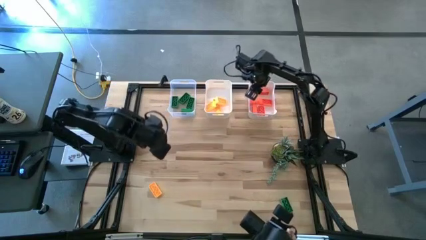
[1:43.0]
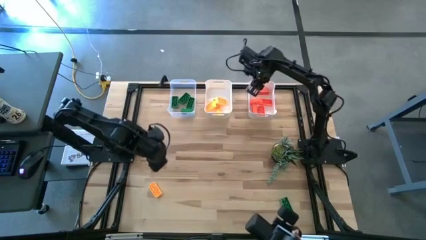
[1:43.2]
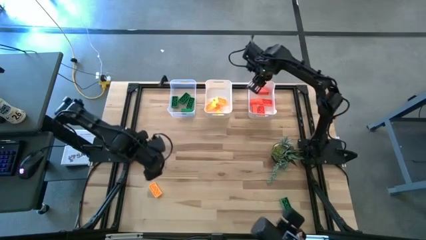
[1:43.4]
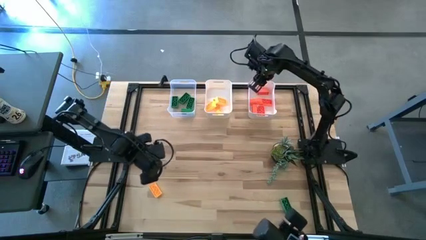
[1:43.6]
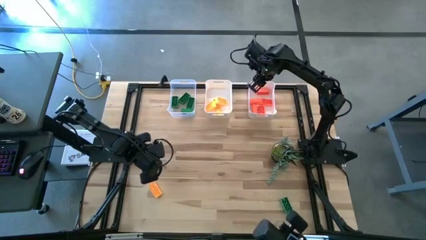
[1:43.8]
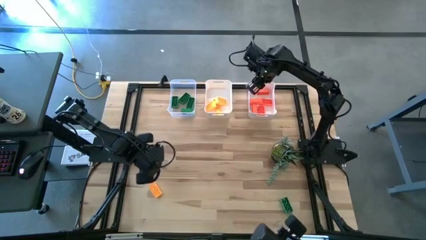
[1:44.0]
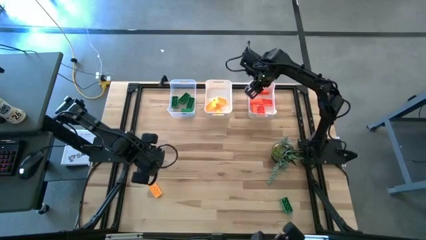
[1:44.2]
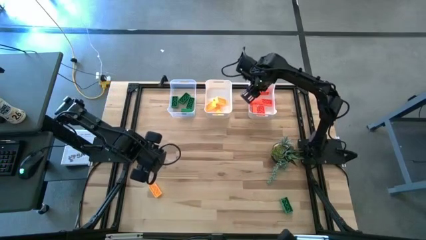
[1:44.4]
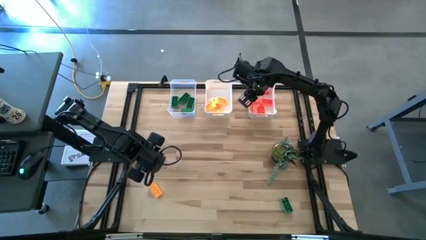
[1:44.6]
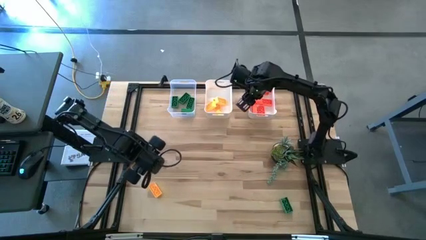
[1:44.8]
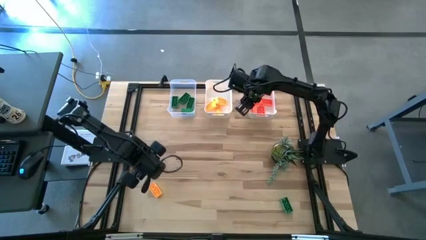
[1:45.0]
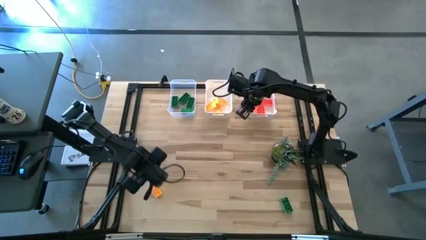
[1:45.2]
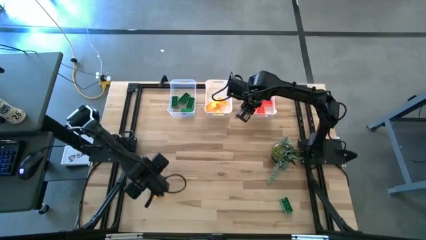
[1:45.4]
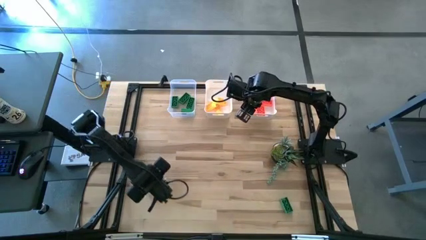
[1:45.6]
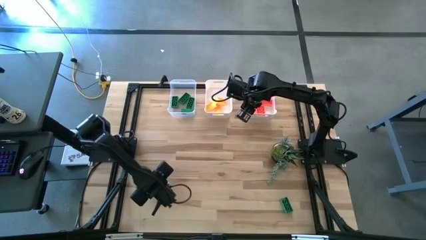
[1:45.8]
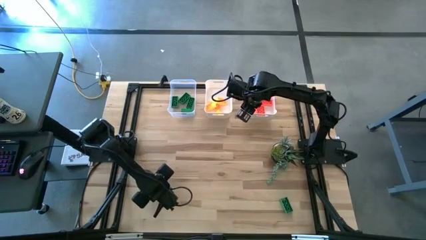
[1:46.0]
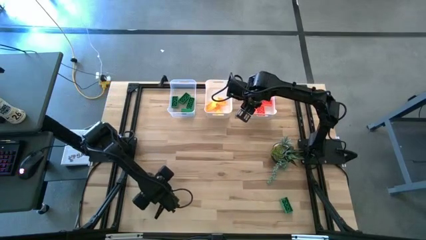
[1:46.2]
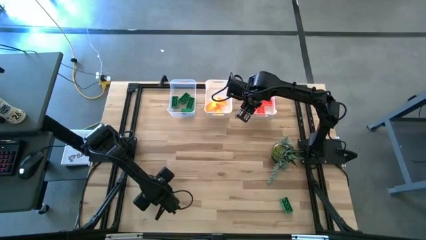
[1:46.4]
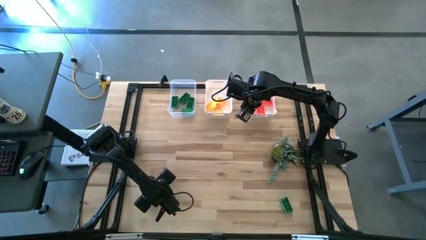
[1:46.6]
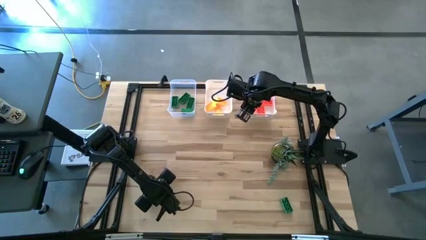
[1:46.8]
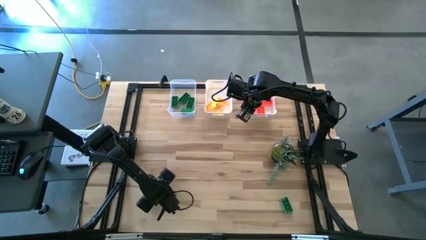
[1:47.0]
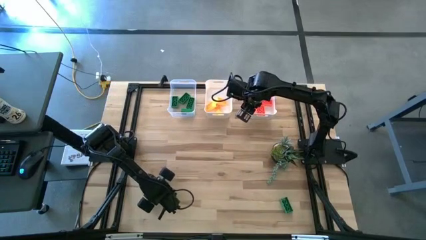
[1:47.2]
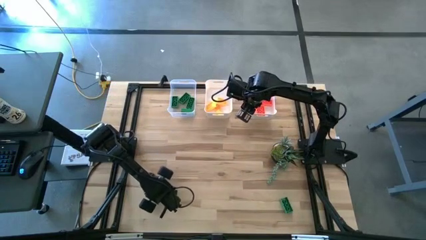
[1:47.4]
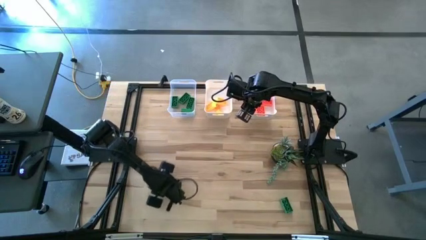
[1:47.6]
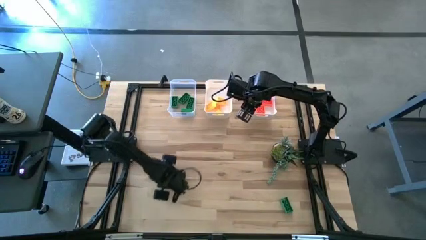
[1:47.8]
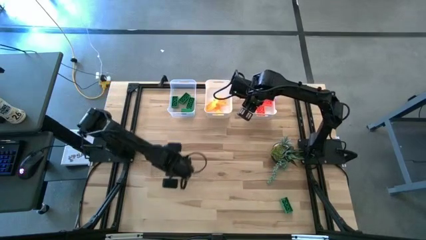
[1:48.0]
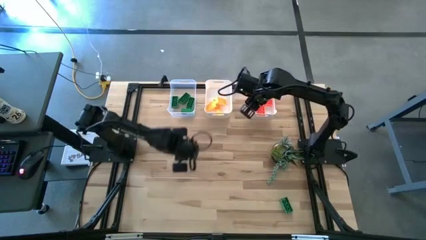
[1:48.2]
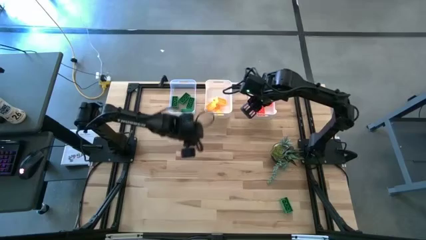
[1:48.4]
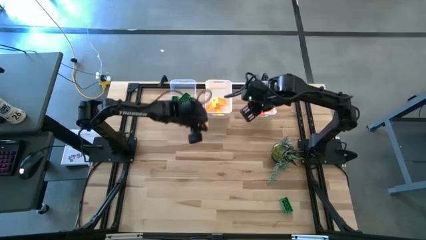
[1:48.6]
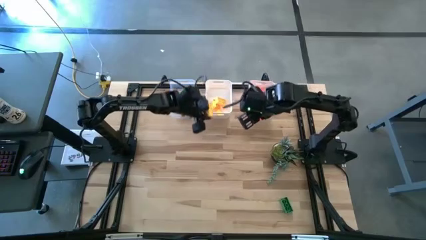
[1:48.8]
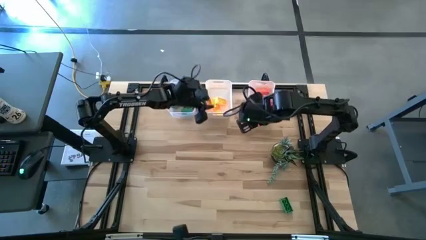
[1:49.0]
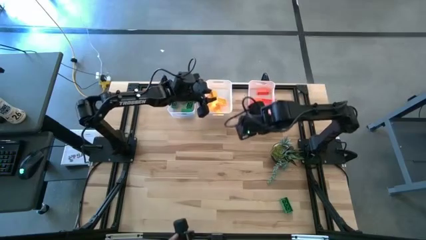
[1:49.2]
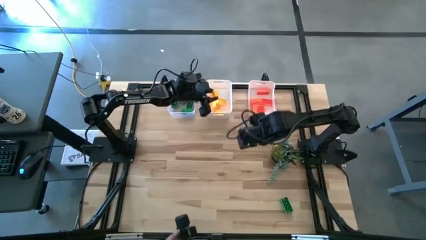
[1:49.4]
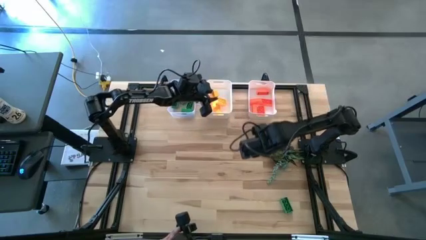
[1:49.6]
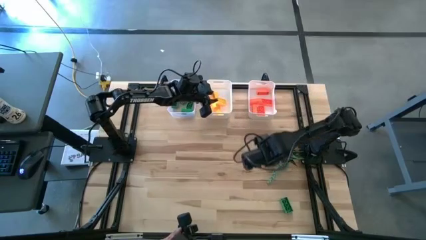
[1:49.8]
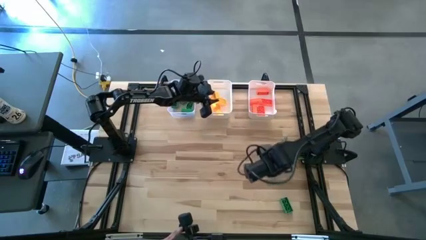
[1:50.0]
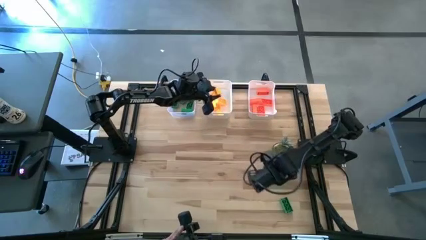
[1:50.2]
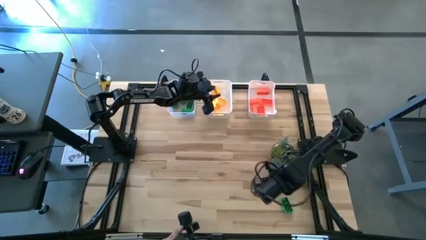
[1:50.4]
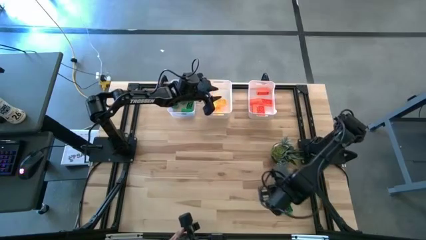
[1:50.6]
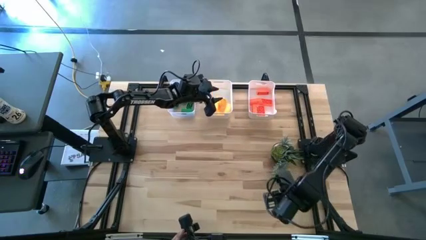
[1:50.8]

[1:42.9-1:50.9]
Task: Sort & place blocks by color
Put the yellow game piece into the left white bin

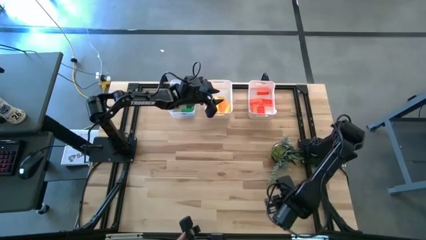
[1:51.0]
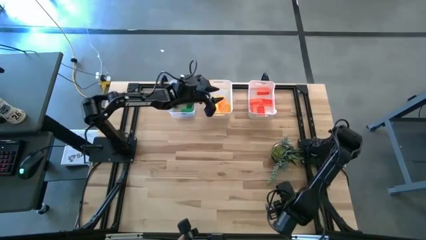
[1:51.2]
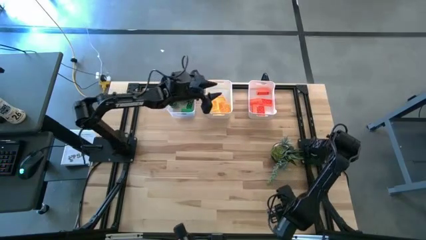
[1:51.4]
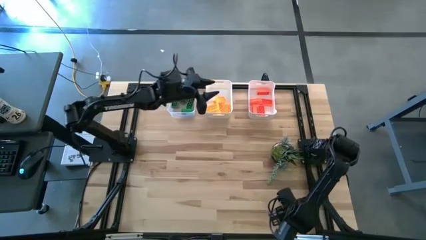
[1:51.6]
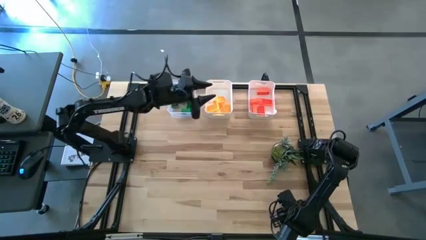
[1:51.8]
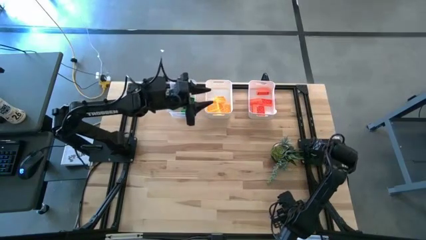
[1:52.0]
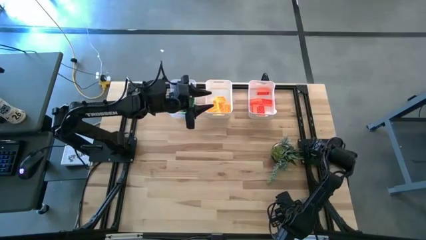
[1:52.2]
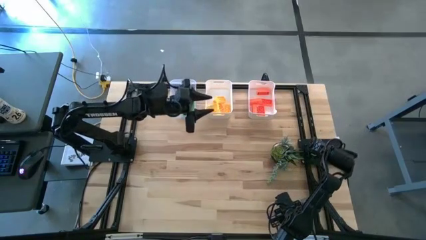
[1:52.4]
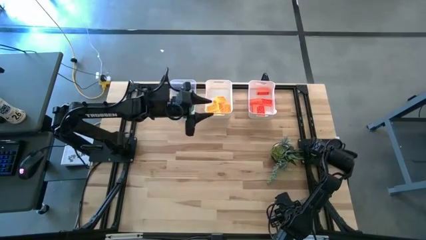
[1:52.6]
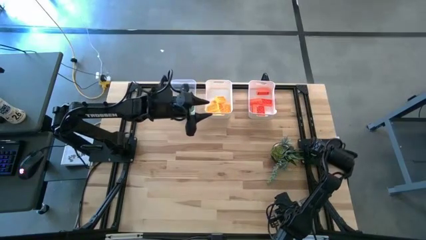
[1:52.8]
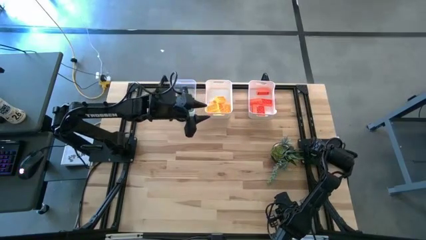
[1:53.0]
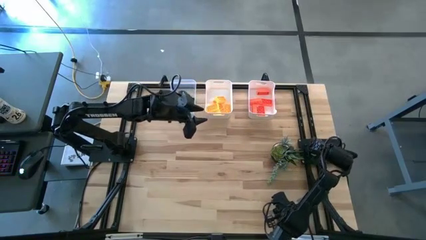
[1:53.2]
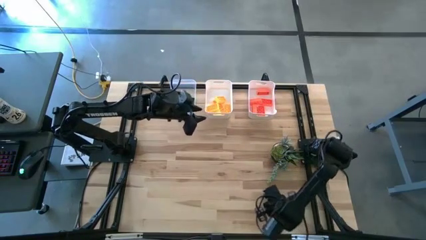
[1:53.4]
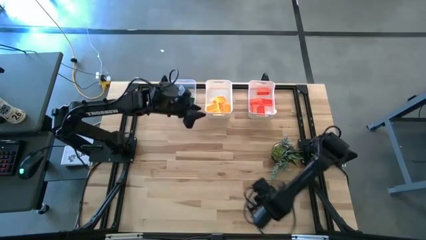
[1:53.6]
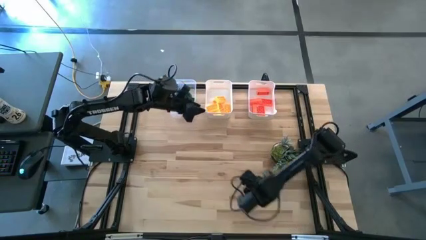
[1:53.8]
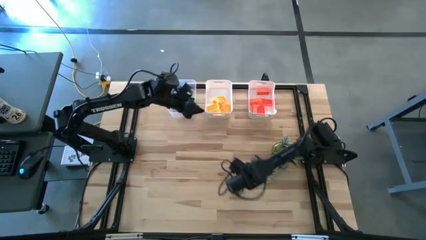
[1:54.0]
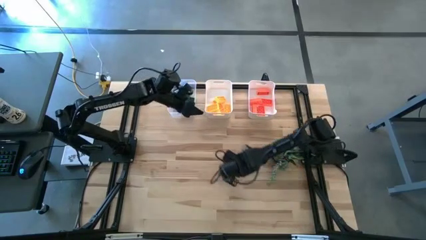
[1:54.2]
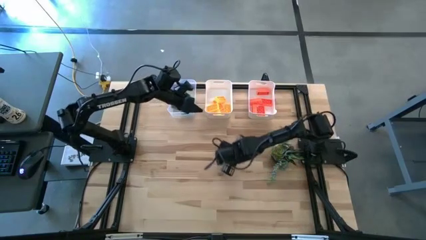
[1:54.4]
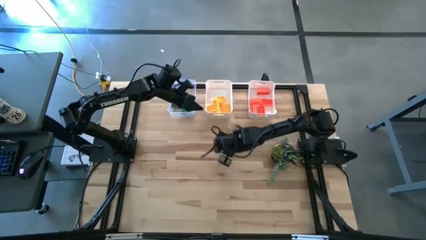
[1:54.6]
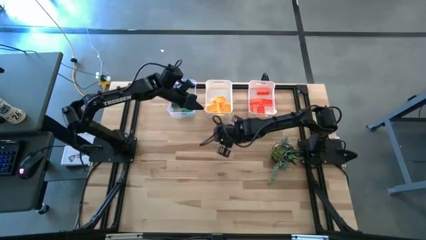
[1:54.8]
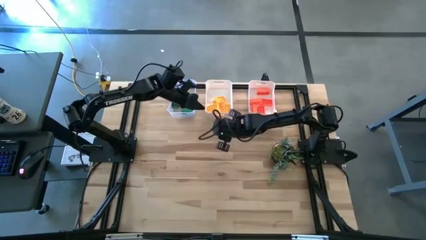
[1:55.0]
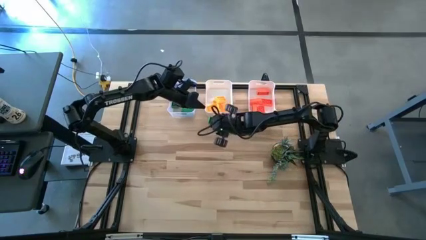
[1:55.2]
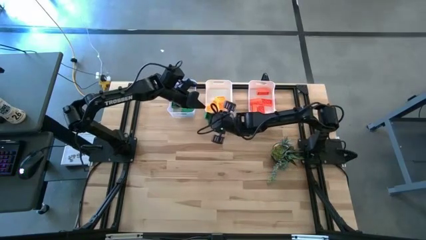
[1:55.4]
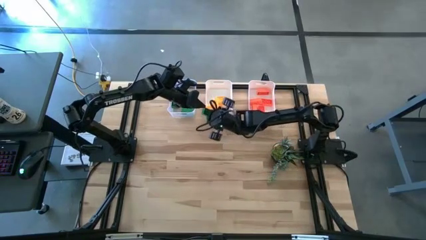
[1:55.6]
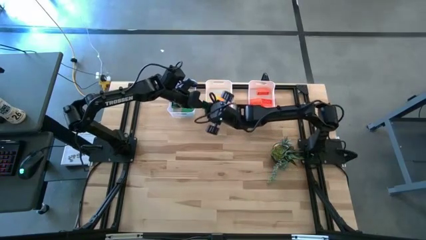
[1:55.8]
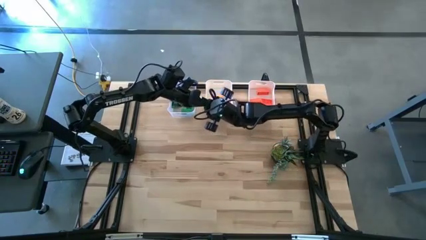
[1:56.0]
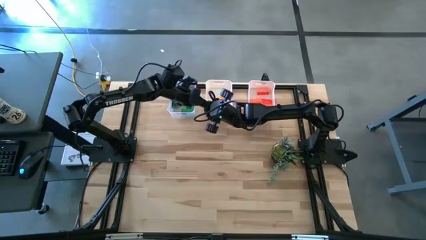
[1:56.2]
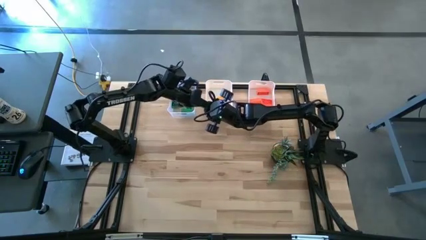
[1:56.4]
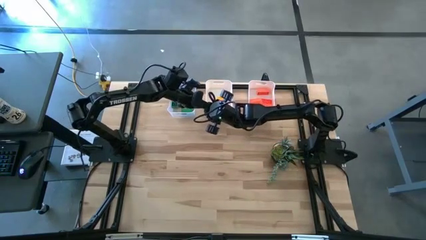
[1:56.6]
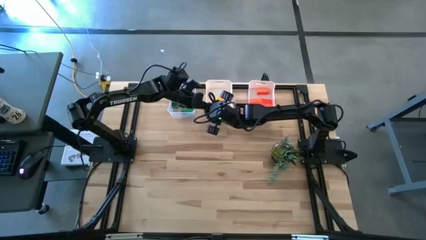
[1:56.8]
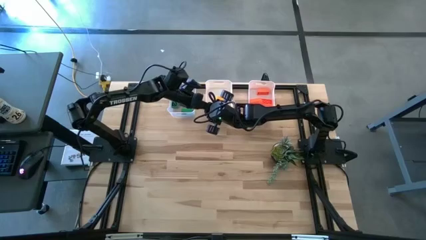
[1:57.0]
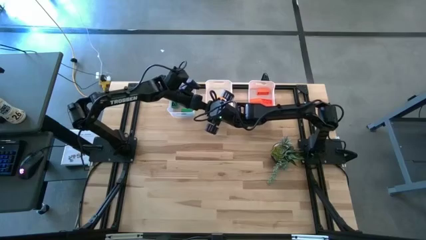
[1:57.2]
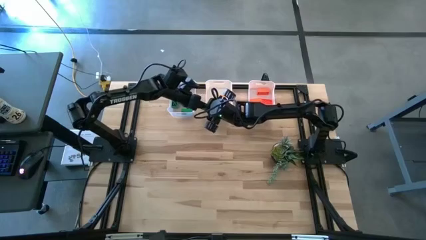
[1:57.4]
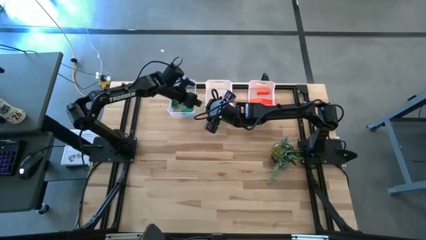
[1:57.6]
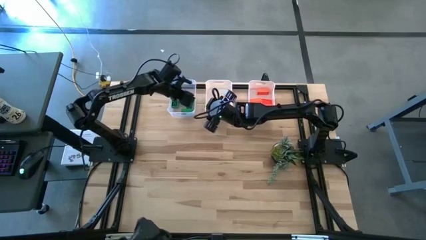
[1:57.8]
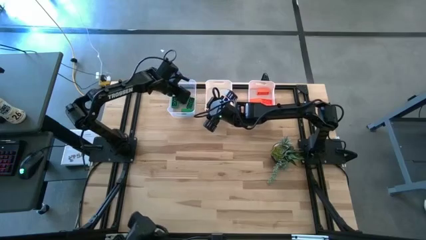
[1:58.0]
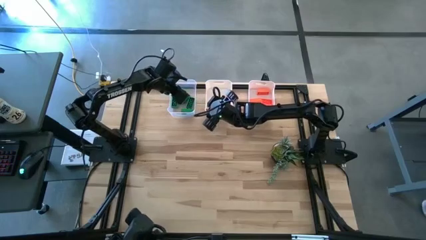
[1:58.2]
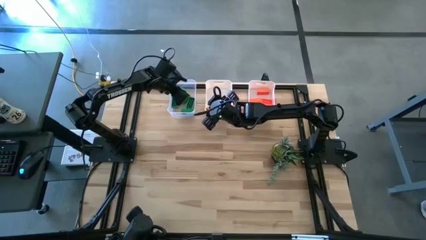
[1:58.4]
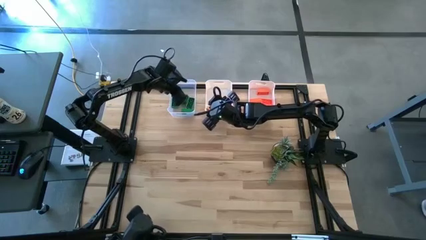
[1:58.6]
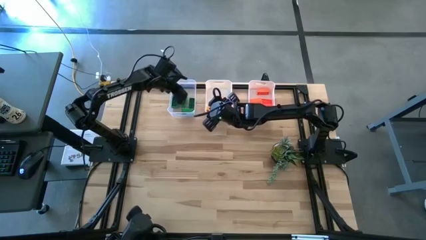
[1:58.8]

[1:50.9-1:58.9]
Put the green game piece into the transparent bin
